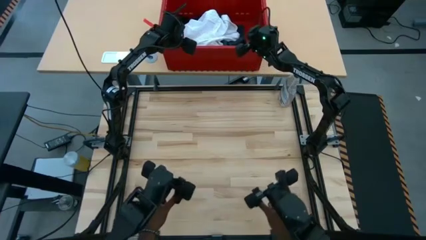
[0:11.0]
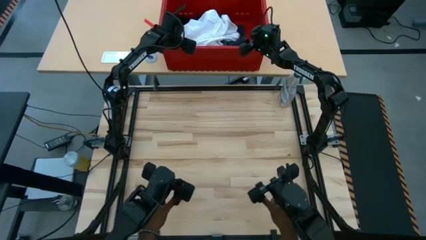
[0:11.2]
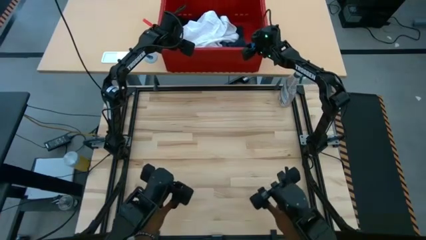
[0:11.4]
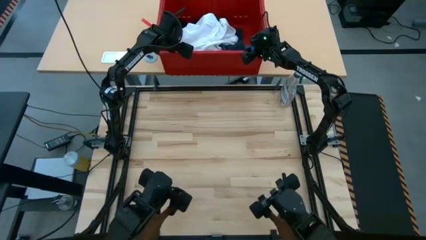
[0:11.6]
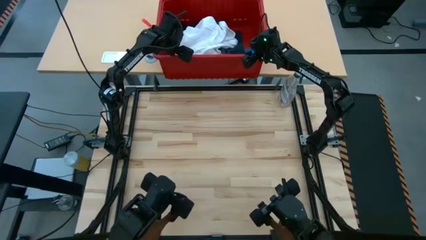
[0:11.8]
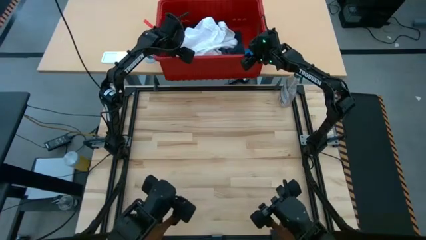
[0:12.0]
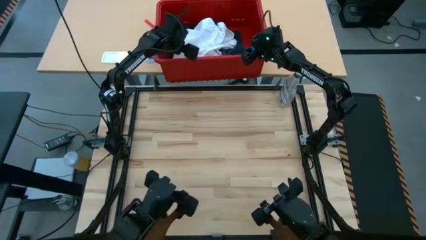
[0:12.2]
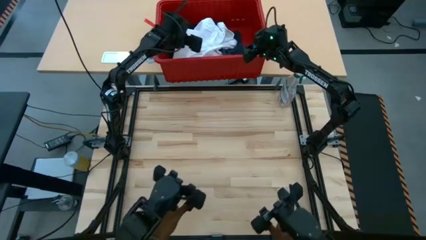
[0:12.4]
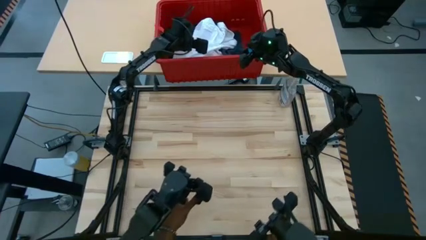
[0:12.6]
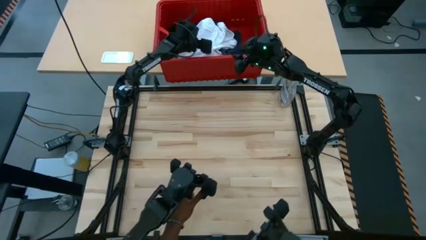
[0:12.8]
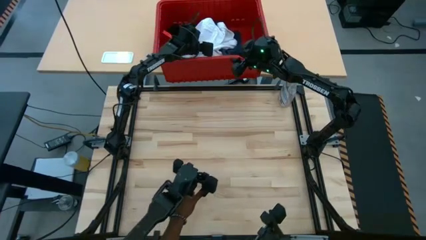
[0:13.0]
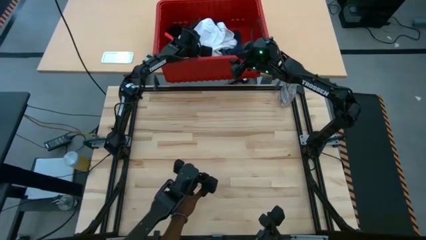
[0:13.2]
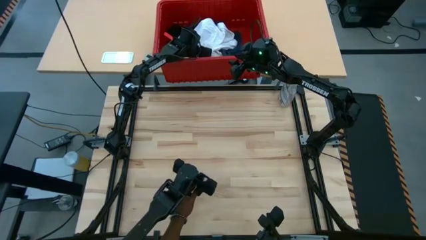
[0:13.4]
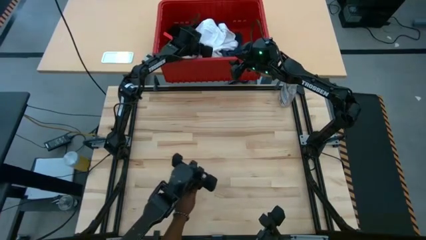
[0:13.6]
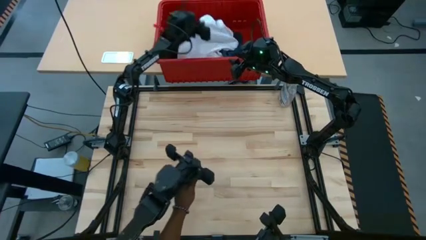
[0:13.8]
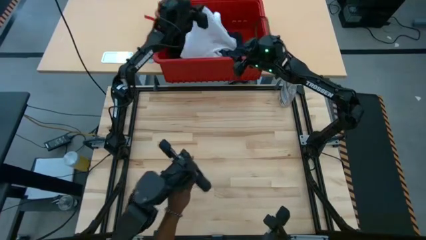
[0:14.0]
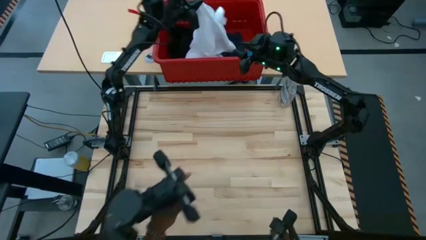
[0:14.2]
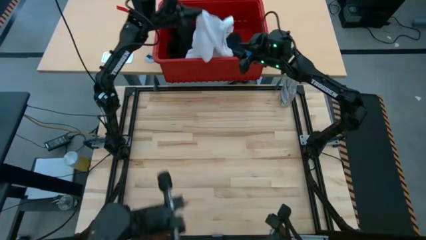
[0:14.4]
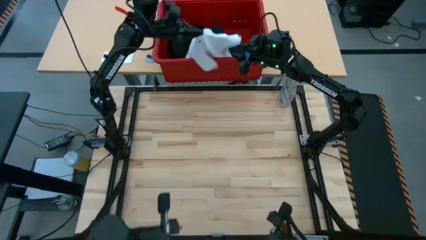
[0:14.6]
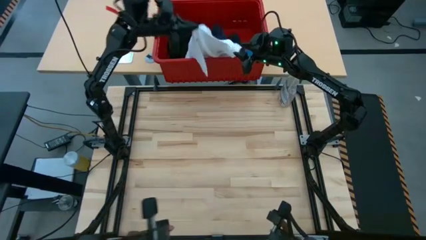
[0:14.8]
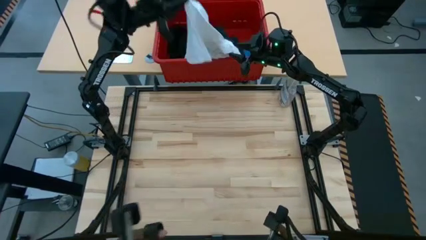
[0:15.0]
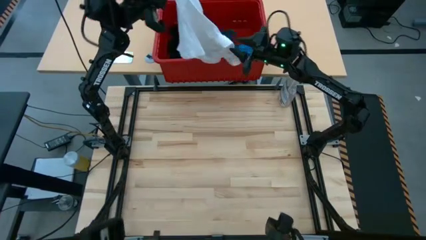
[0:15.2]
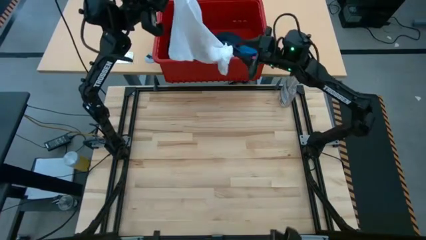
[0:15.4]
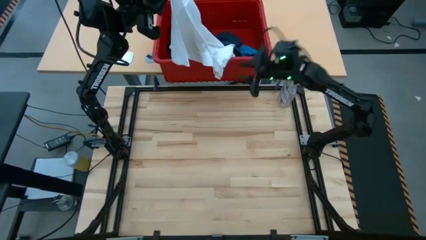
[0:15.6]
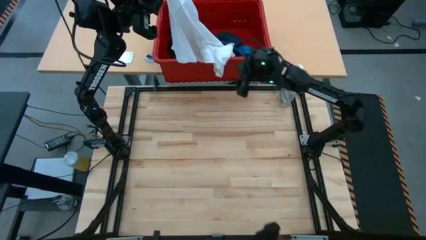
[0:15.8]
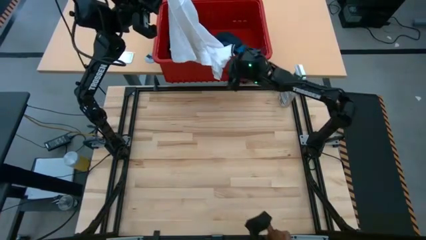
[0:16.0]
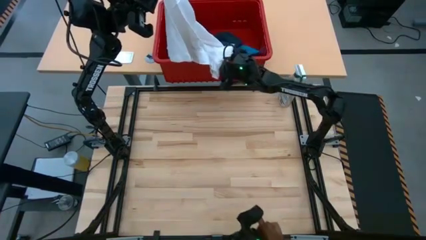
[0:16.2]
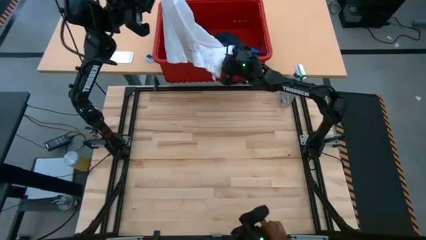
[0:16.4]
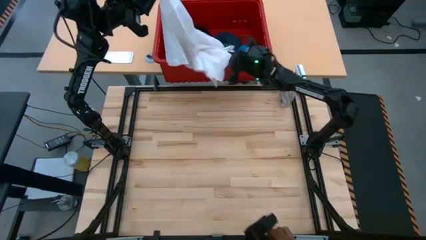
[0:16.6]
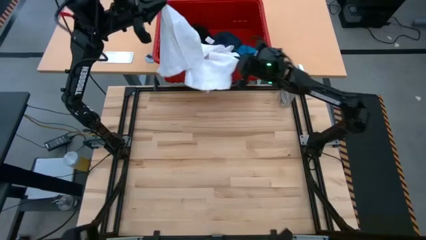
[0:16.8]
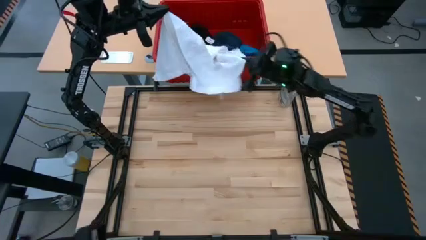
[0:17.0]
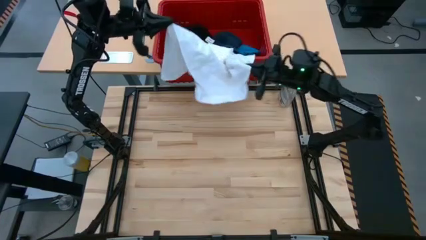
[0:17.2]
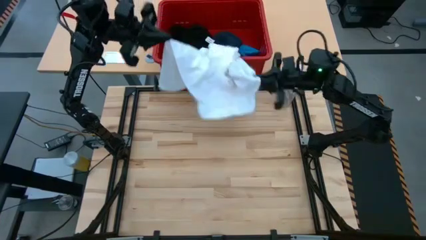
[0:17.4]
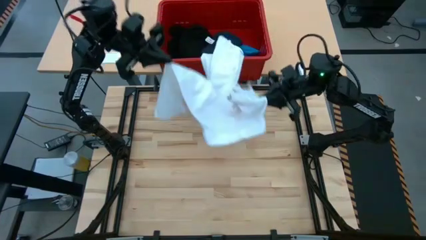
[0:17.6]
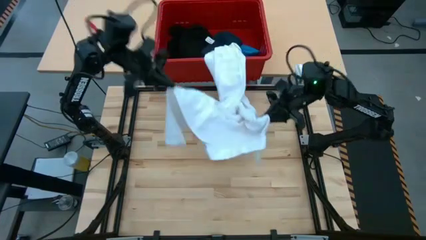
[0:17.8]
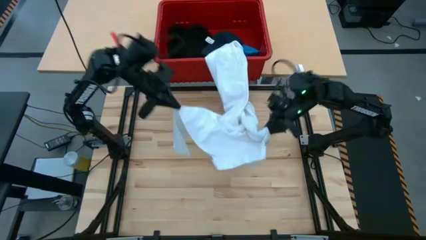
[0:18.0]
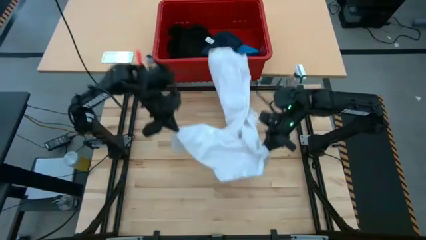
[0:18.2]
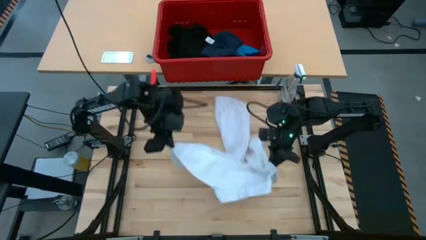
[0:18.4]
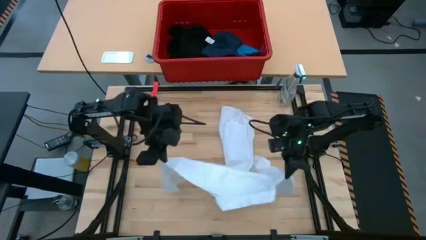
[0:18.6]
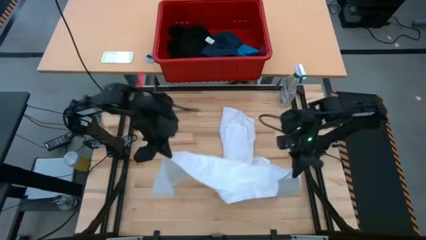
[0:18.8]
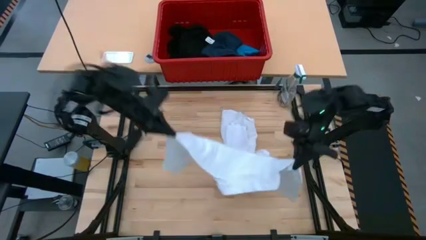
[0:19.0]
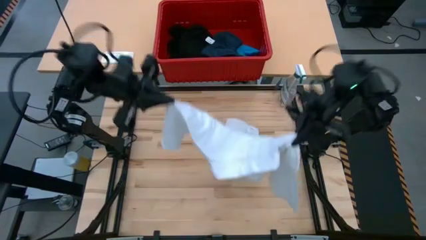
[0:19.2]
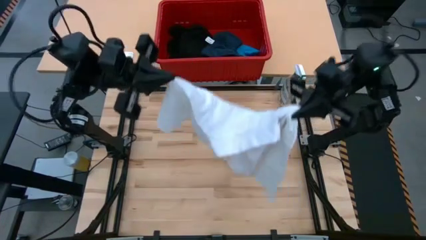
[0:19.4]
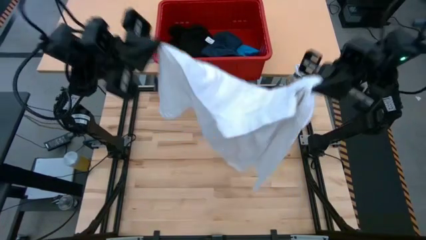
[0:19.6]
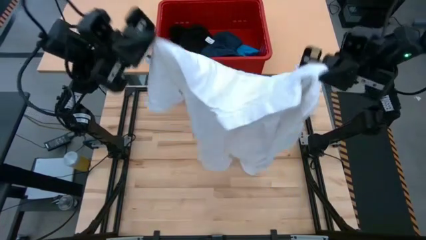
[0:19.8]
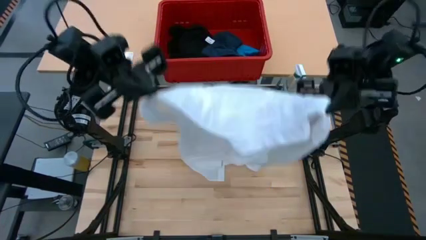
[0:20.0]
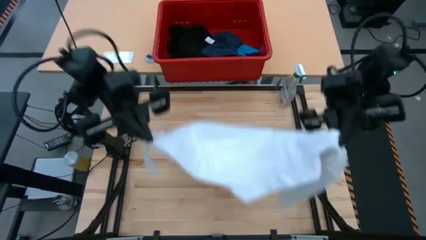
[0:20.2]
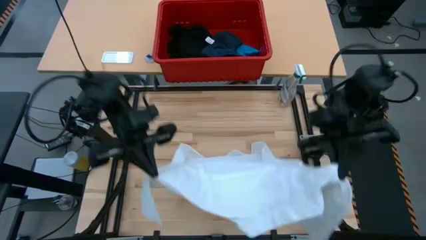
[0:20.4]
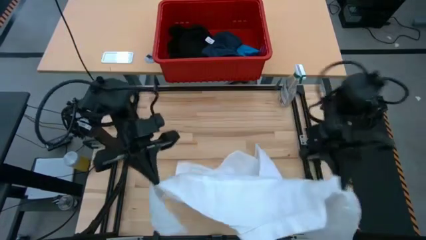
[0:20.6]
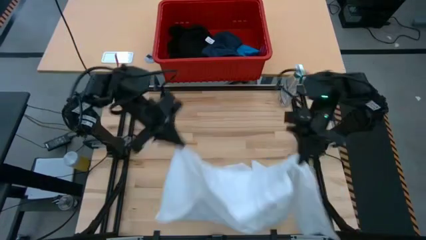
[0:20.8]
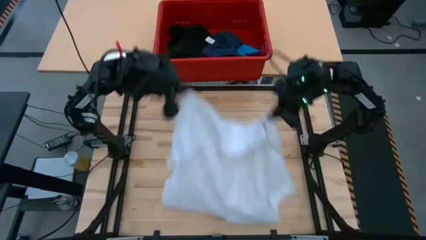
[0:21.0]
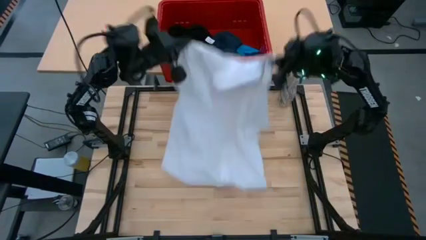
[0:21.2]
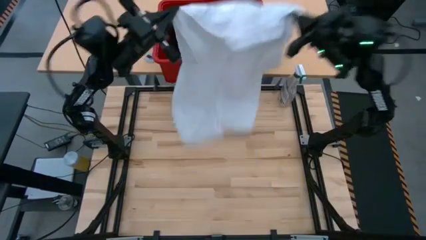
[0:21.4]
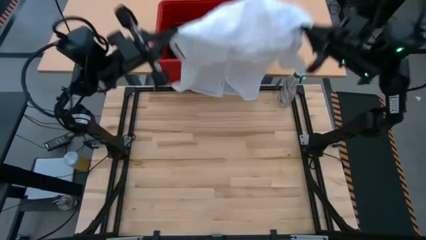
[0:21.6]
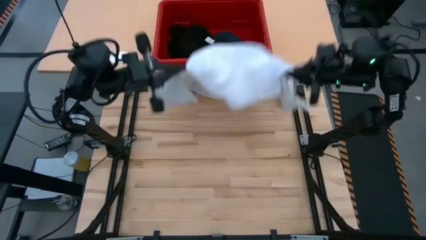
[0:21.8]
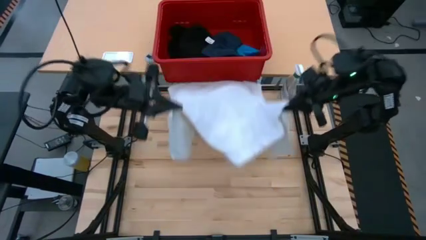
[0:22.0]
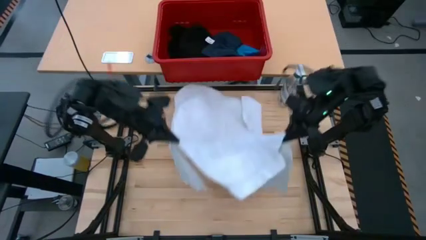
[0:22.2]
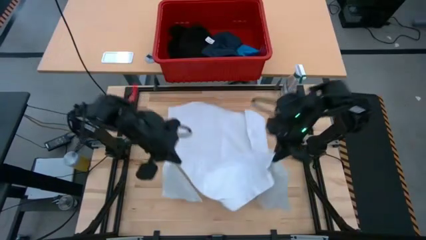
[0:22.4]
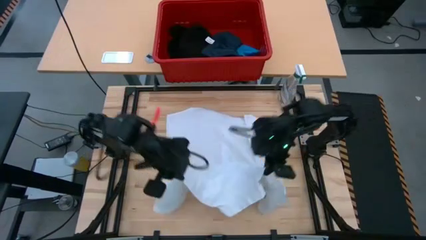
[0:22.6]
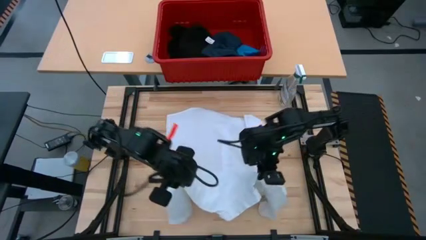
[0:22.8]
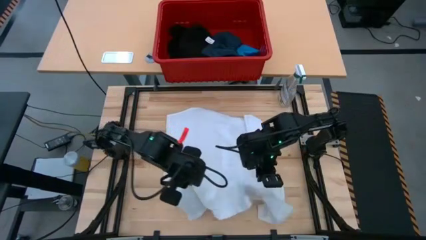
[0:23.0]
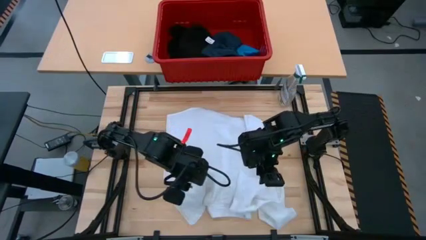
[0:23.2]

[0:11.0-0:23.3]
Task: Fold Laundry from Bin
Remove the white polo shirt from the red bin and place it on the table

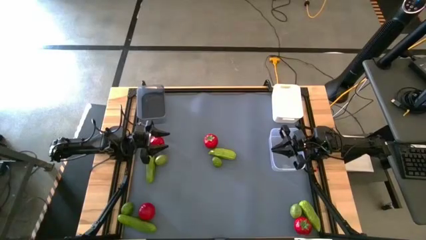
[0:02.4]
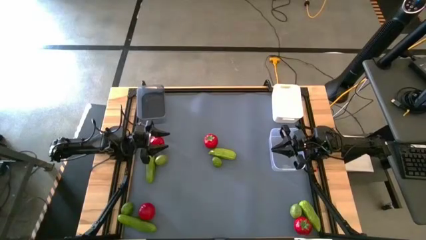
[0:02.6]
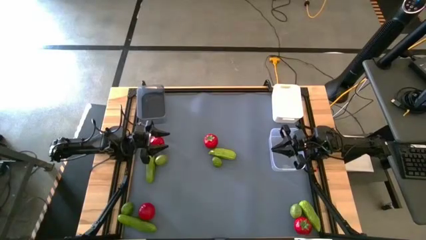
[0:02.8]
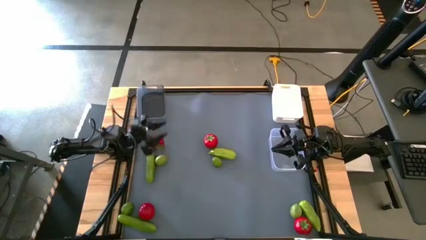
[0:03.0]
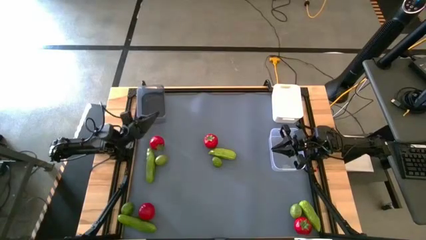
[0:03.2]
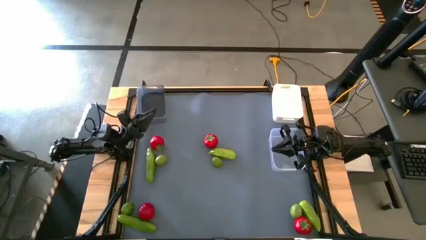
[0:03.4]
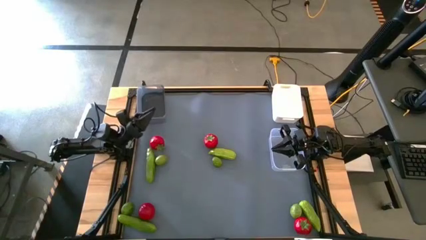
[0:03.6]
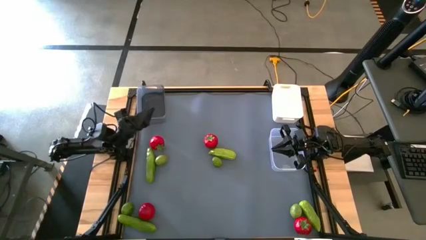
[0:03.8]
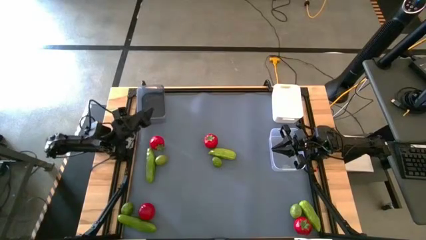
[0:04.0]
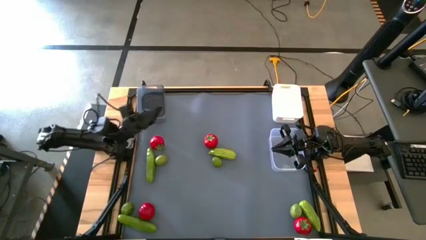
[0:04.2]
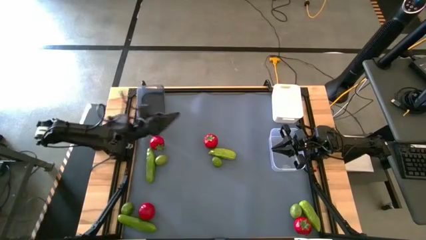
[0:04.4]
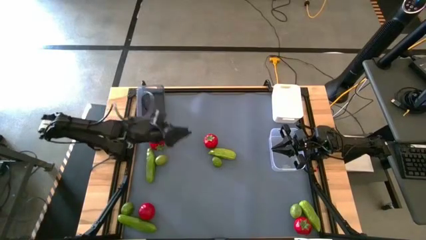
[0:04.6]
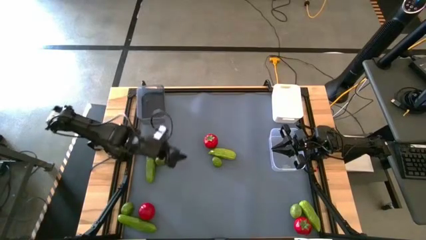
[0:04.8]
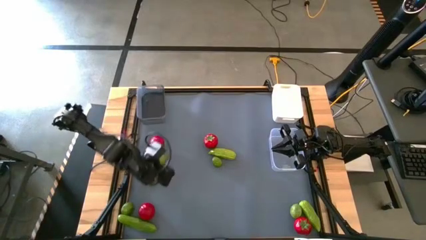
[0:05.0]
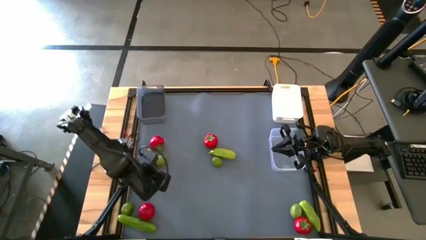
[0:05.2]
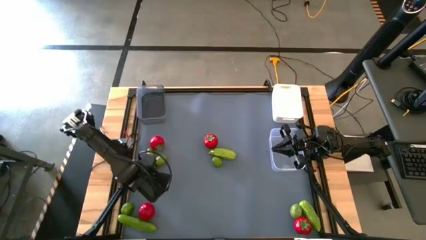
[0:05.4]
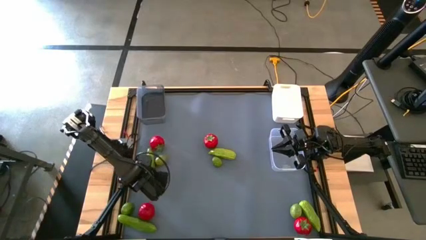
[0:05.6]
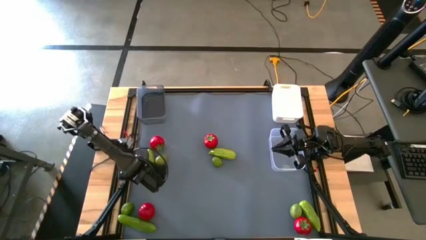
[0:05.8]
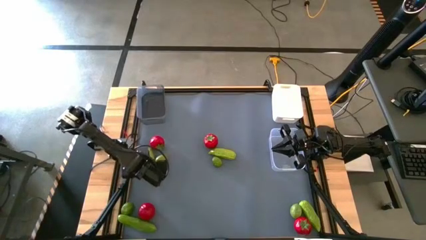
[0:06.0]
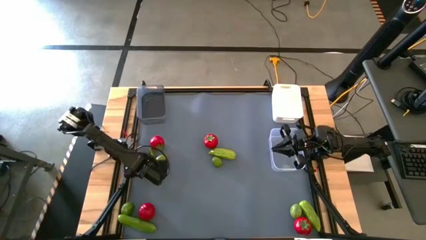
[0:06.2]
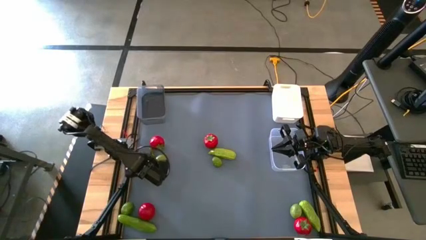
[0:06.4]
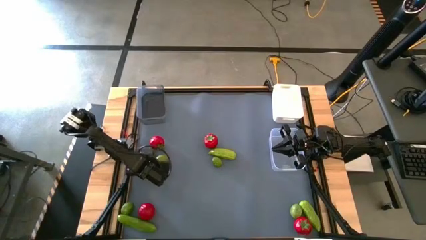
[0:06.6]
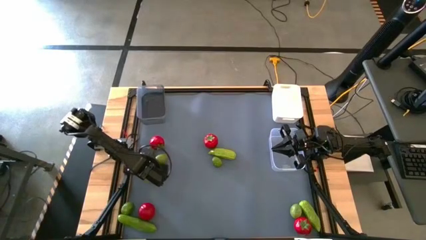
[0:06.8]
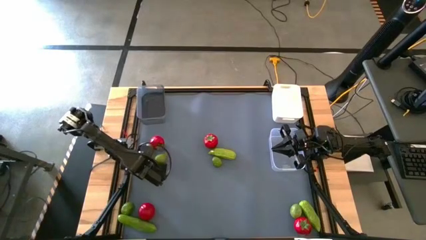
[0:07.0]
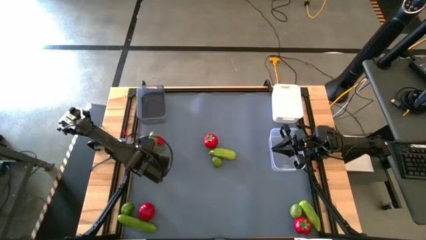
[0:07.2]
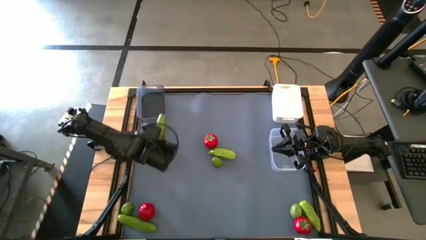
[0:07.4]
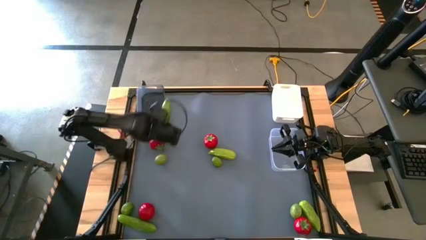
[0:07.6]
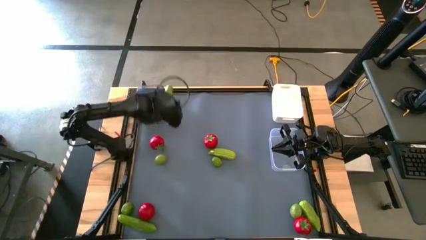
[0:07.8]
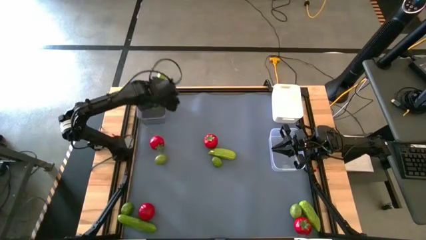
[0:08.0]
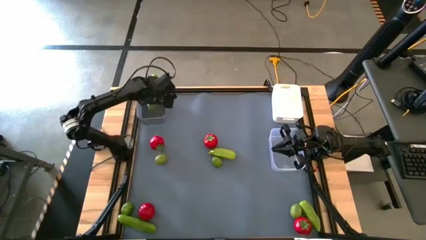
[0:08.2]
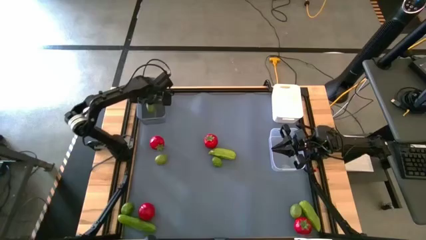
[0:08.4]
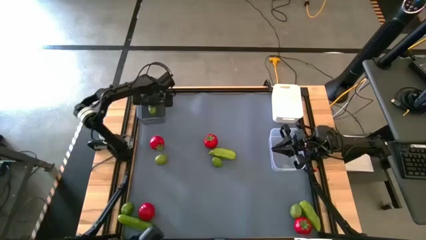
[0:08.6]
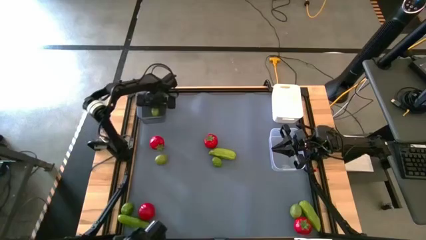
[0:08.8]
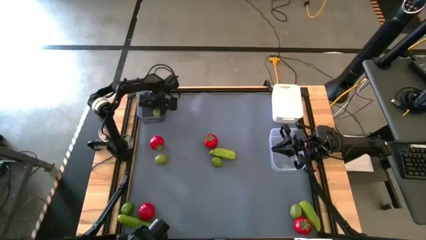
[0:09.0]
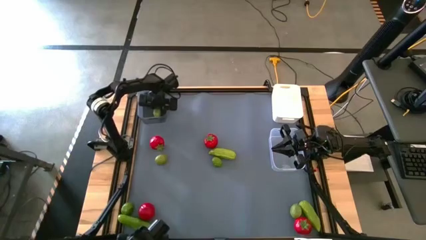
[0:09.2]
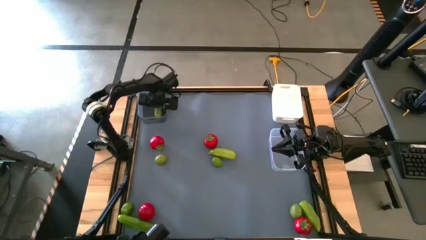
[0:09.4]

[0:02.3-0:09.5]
Task: Sort produce into baskets
Put the cucumber into the black bin
